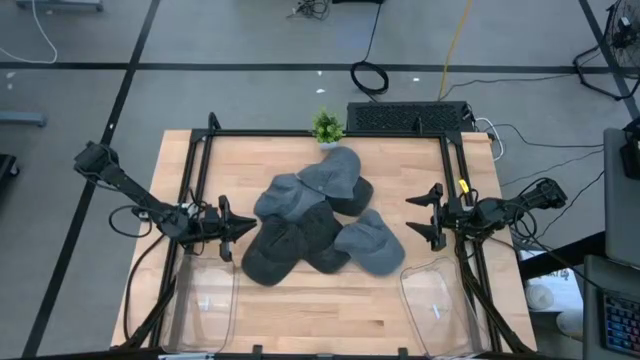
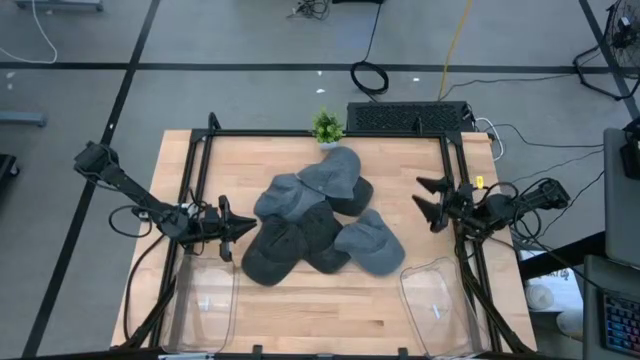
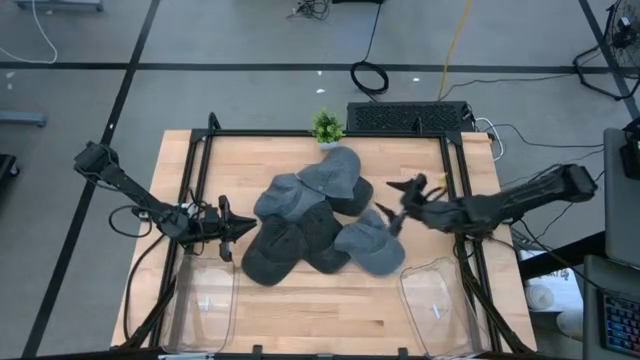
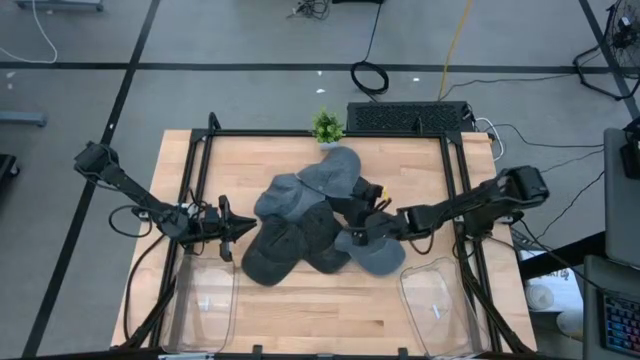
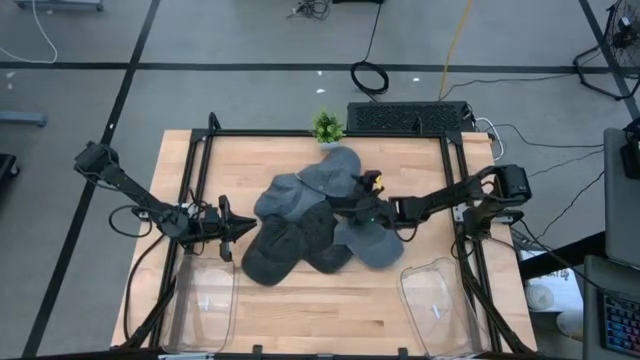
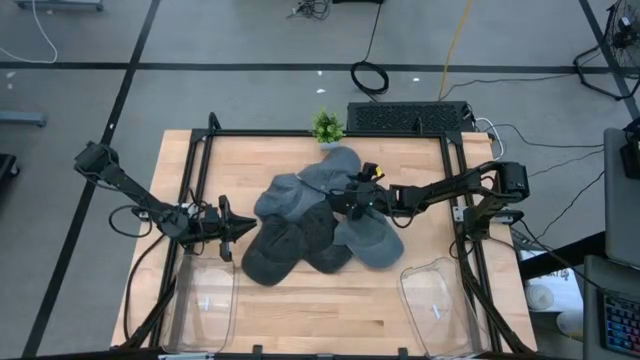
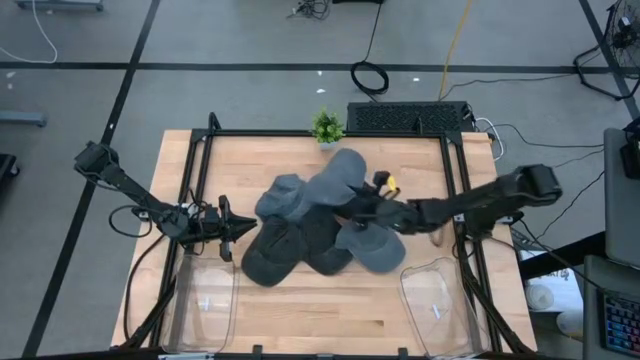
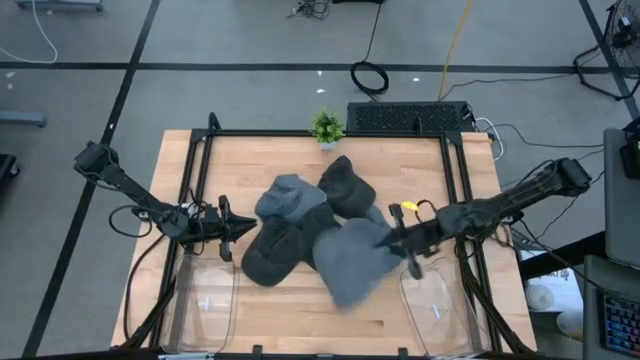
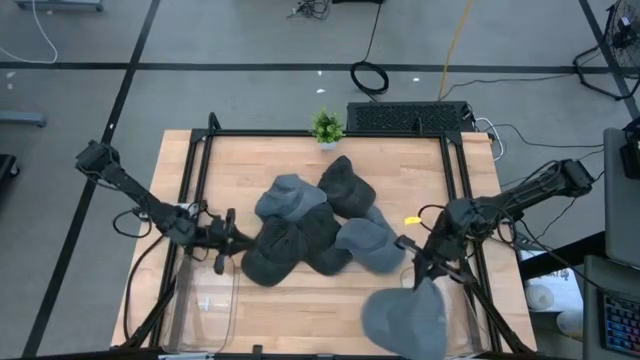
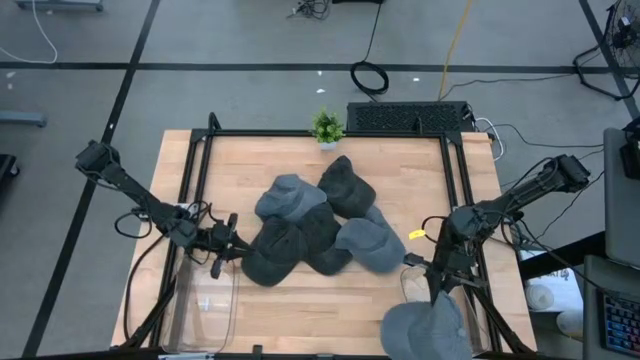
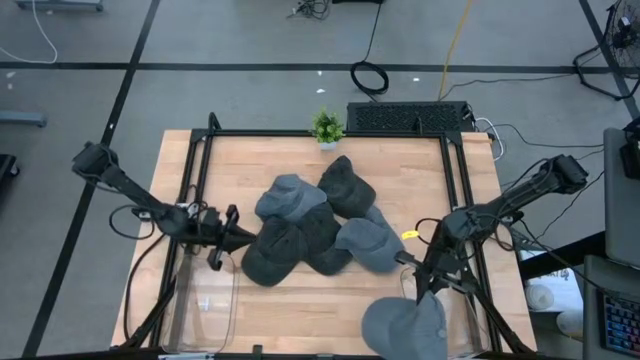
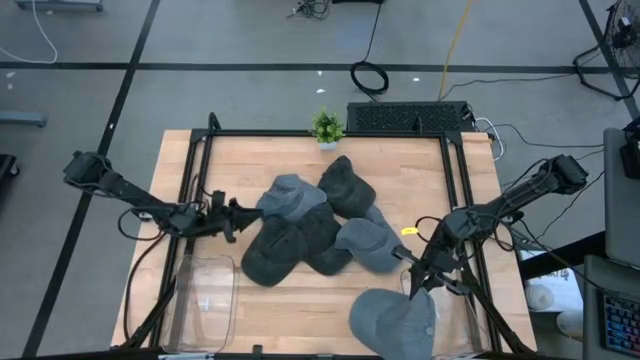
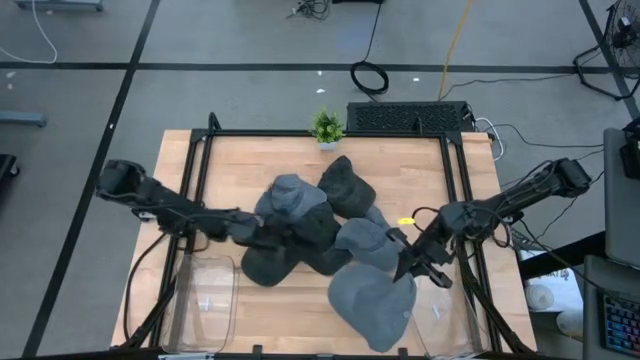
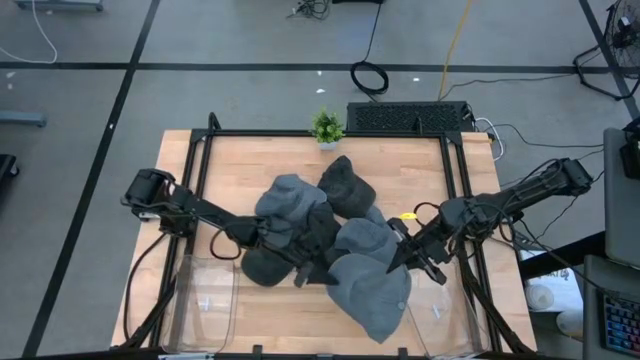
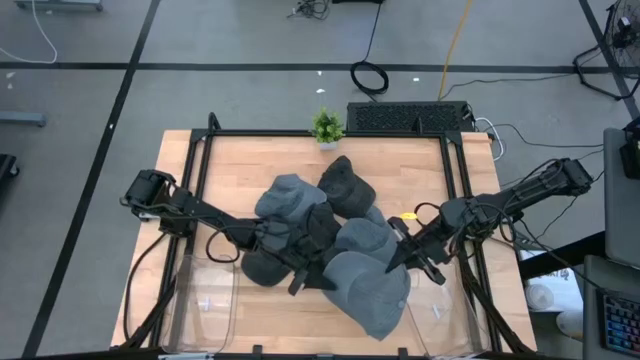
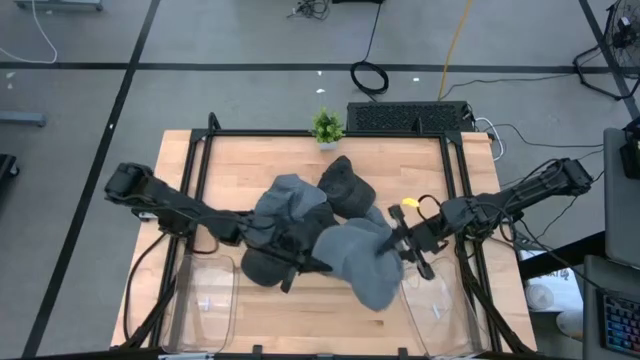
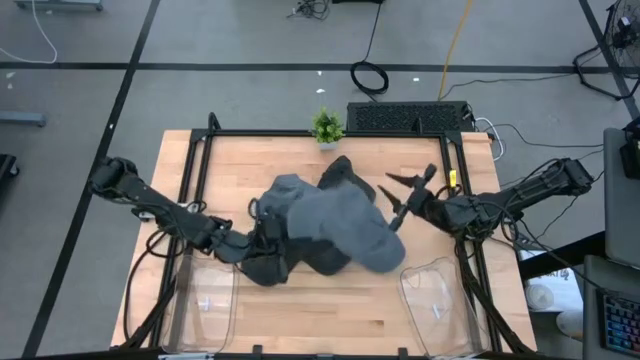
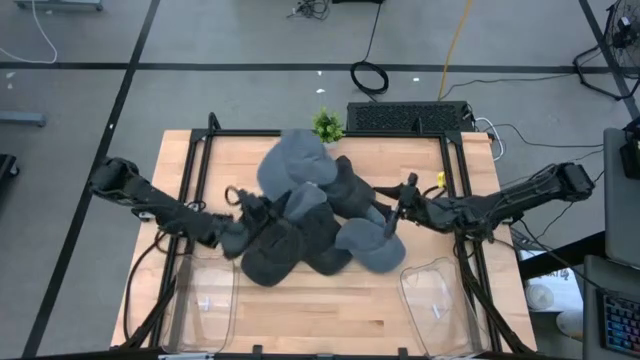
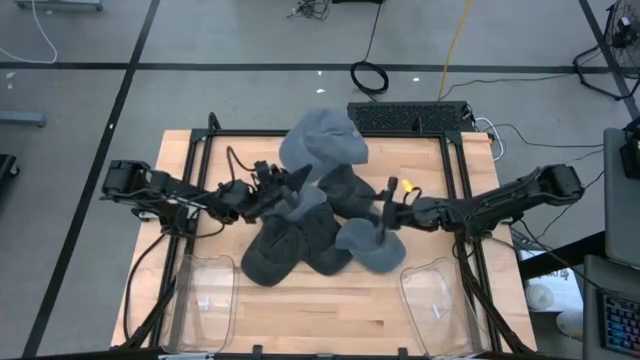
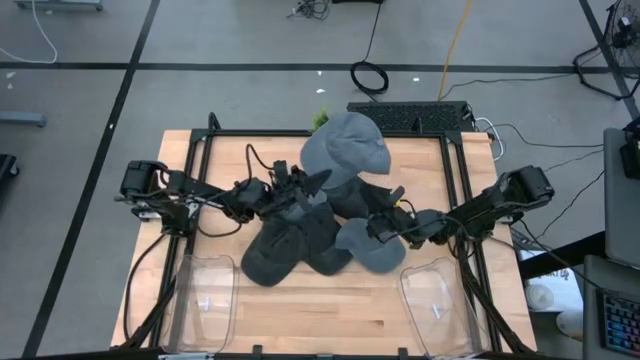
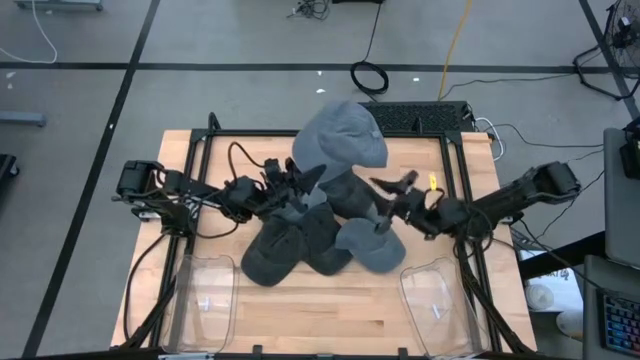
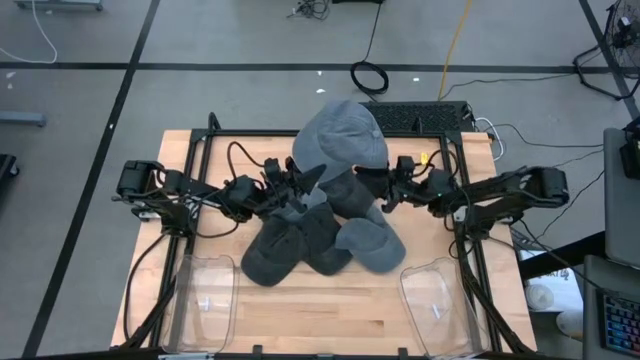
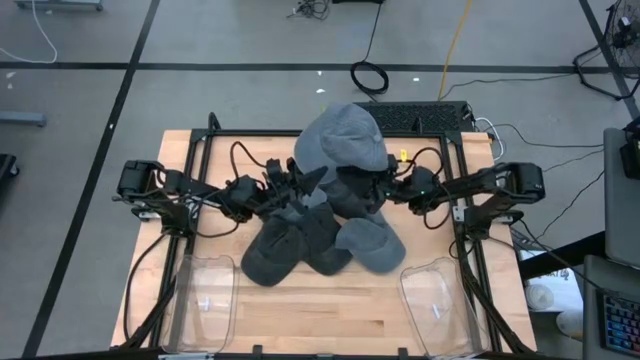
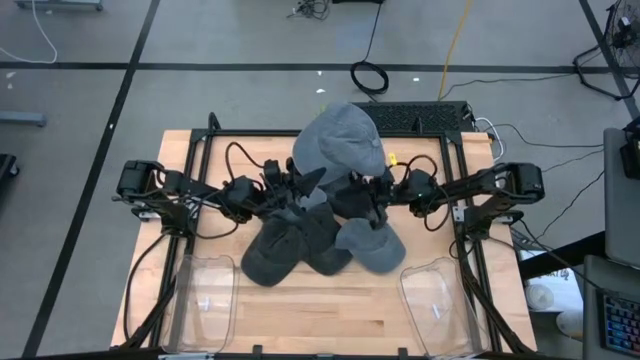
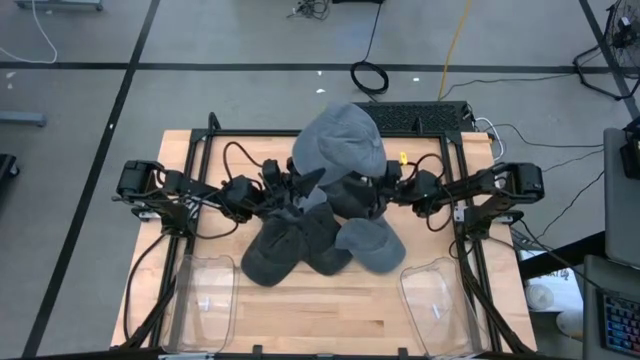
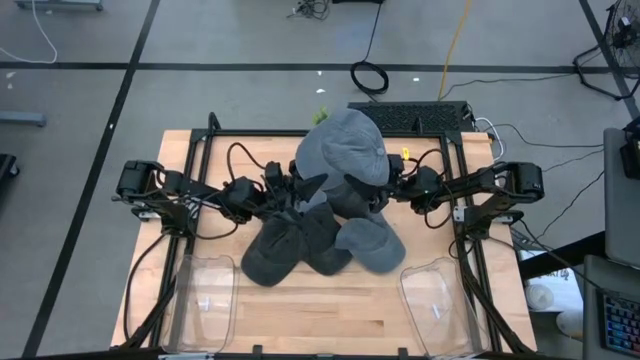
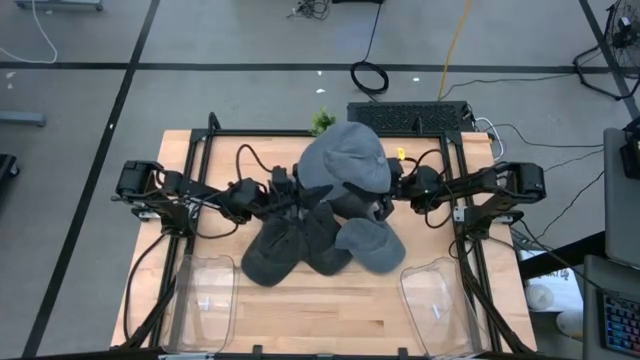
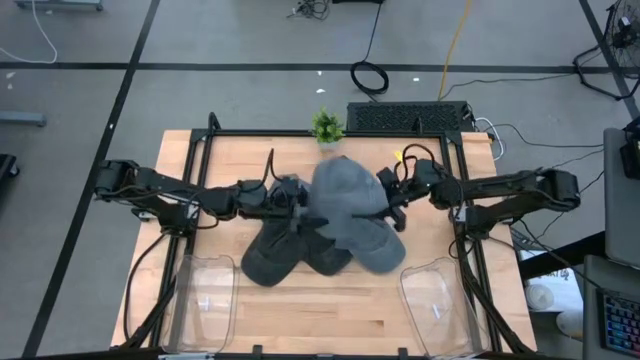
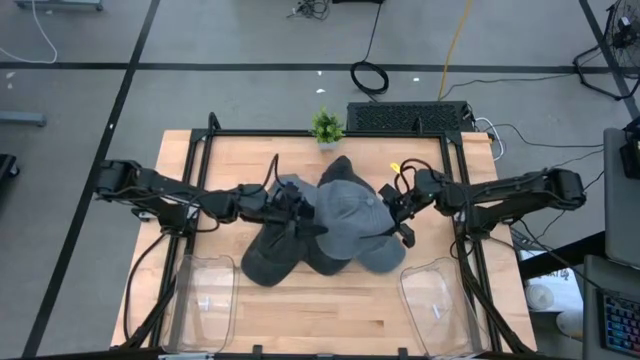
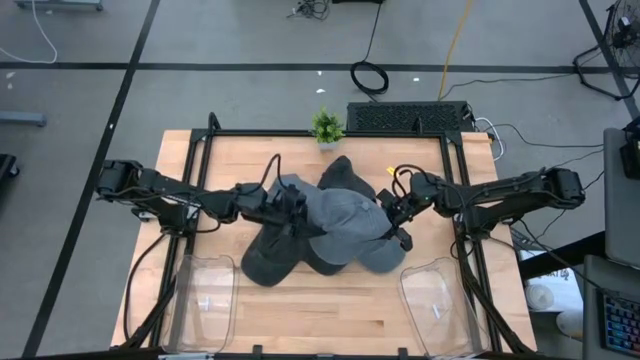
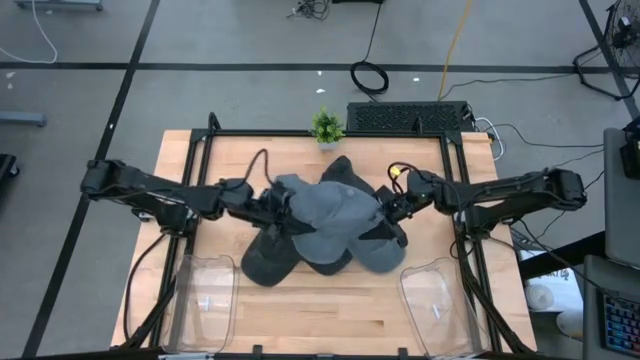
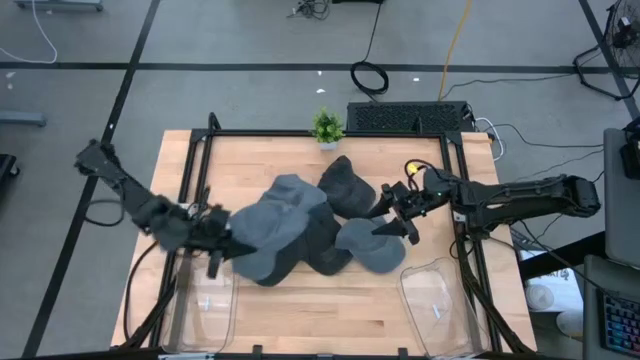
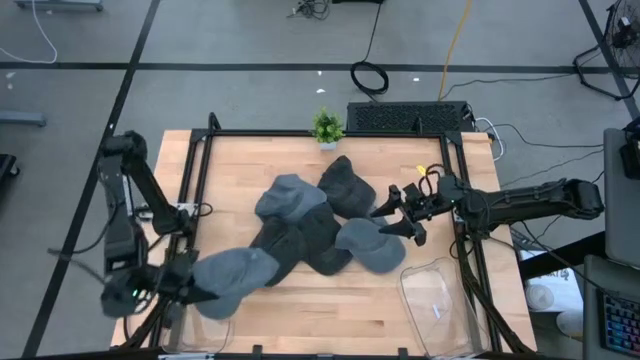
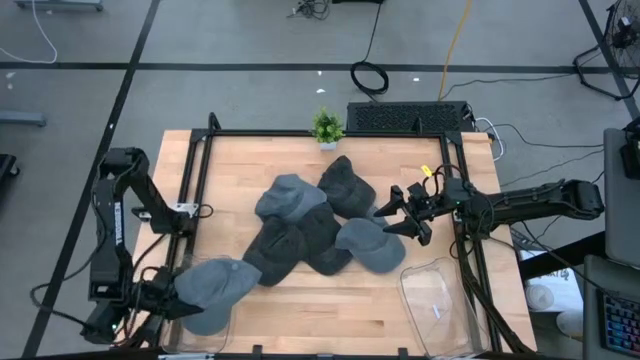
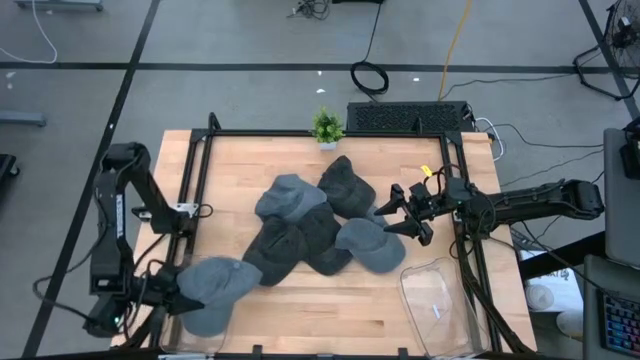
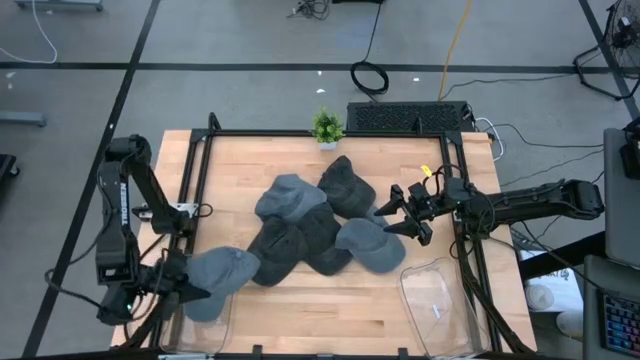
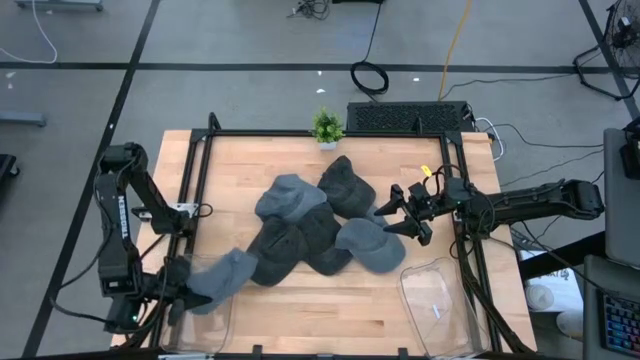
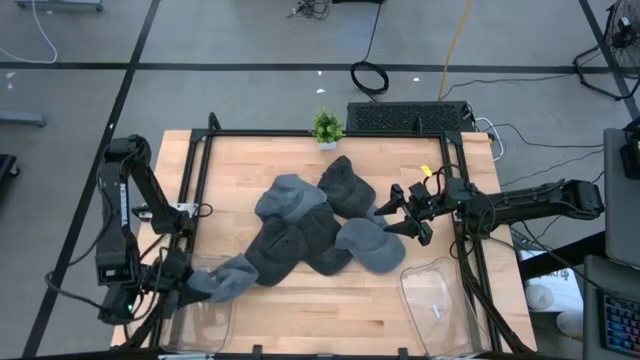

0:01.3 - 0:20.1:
Task: Pick & Place hat
Put the top gray cap into the right transparent bin
